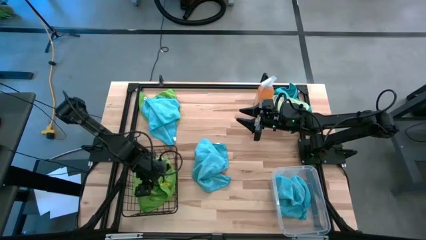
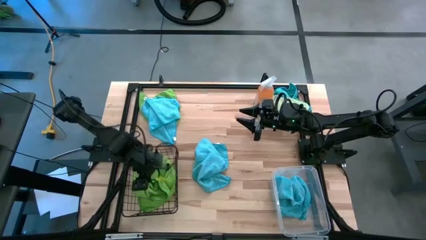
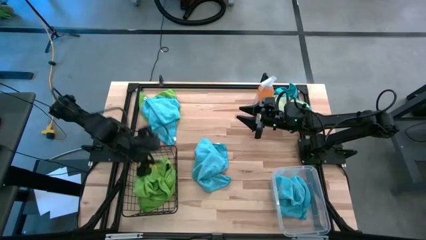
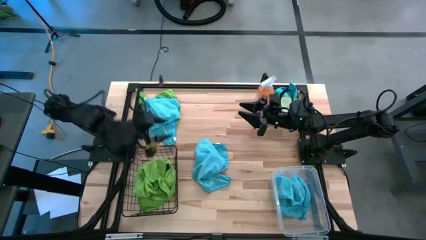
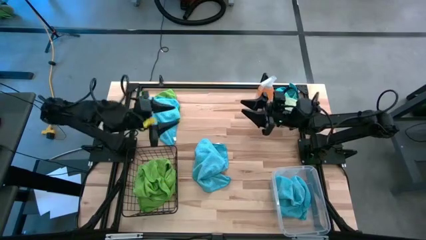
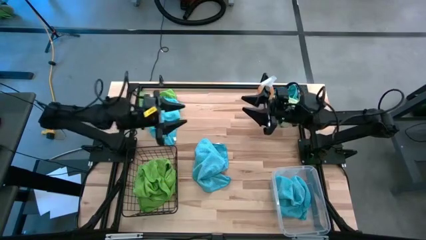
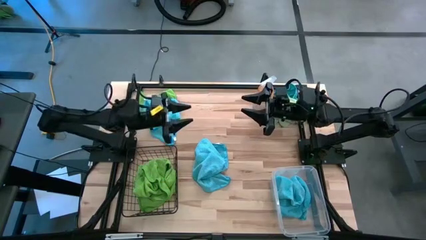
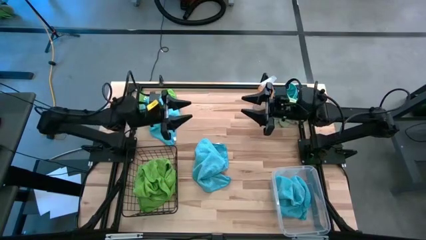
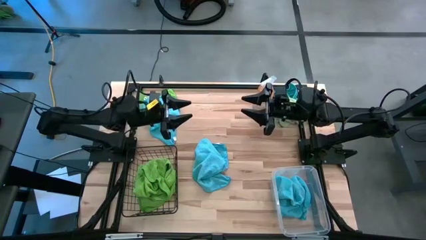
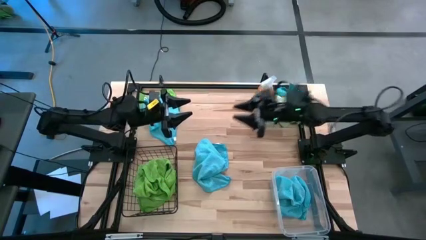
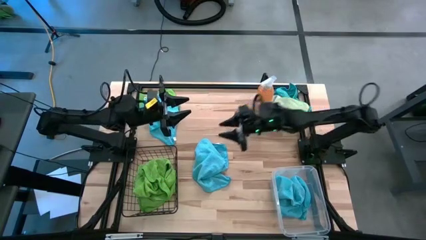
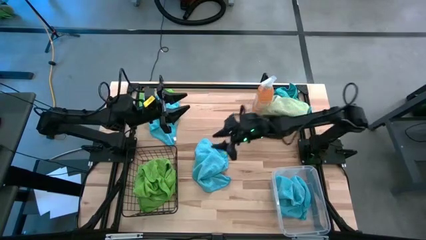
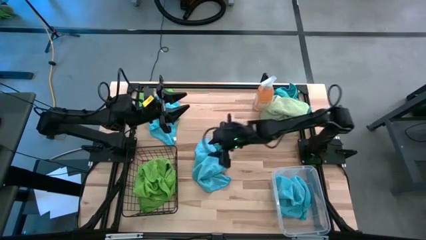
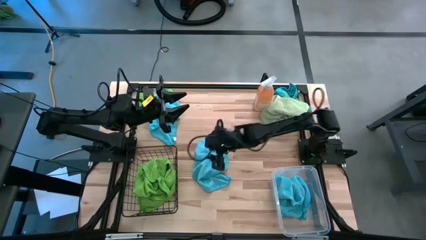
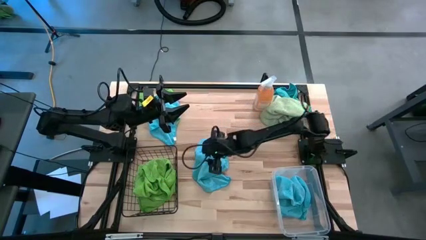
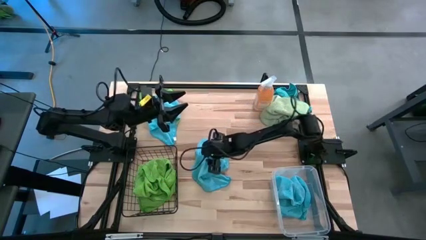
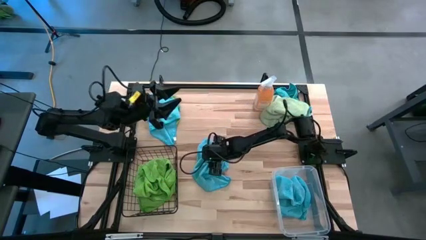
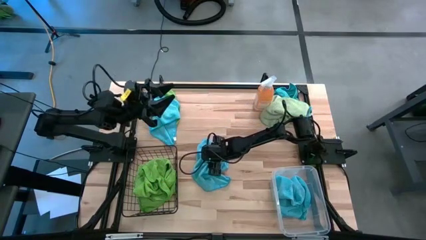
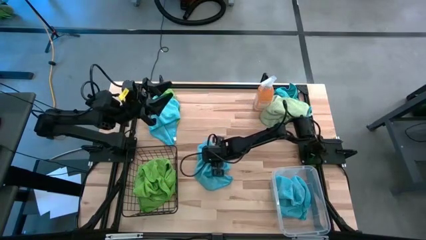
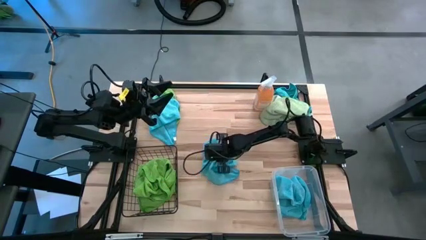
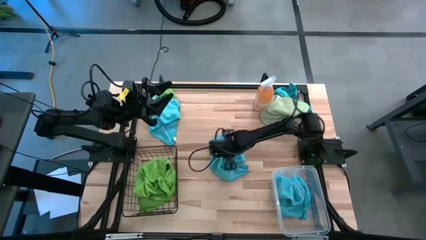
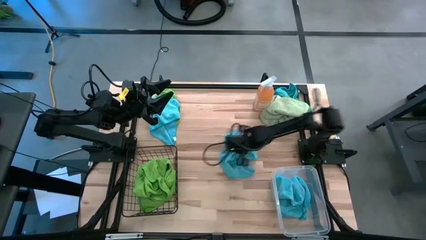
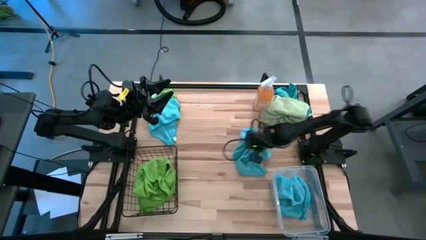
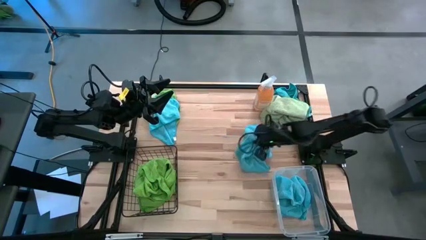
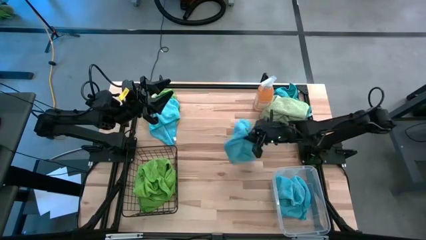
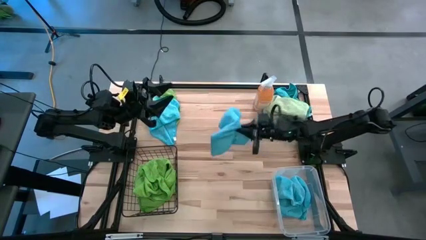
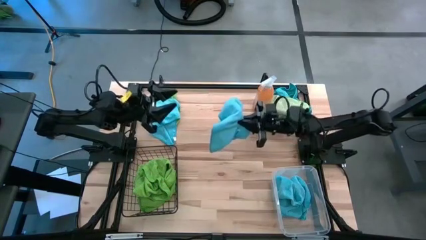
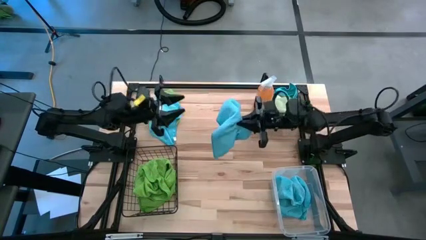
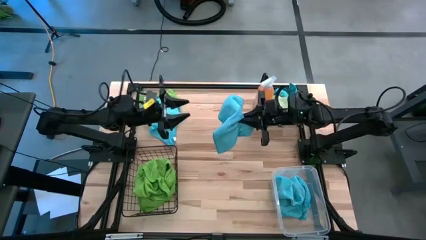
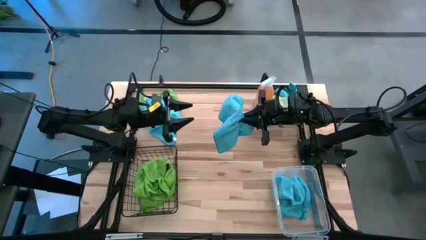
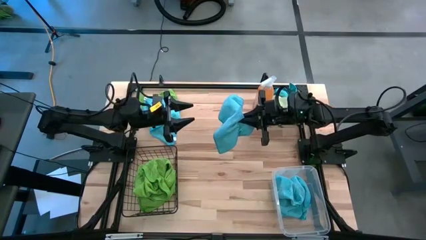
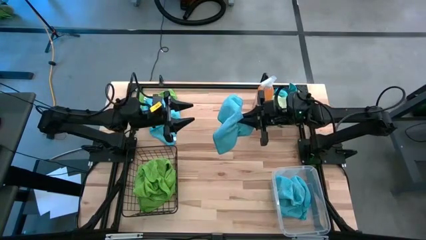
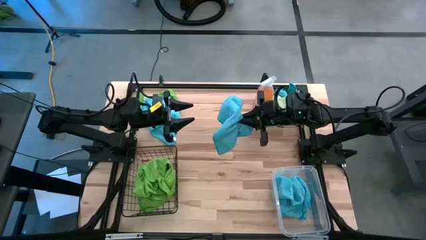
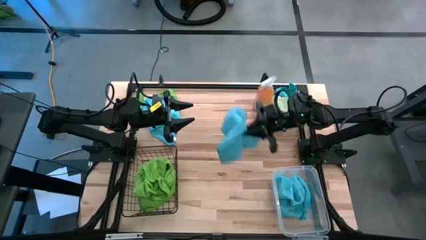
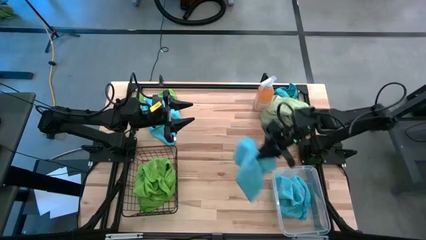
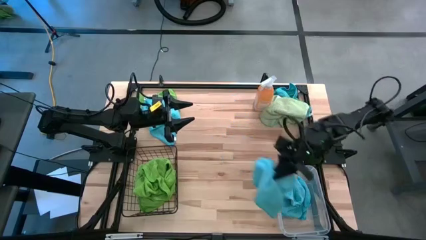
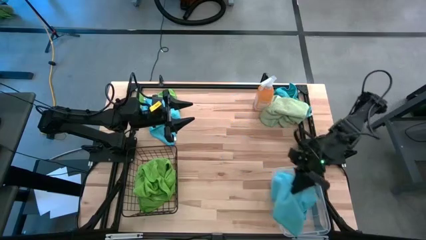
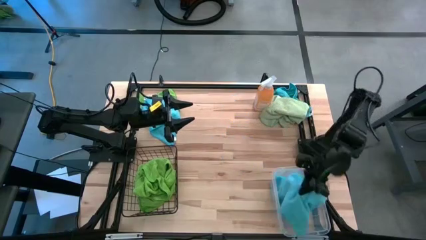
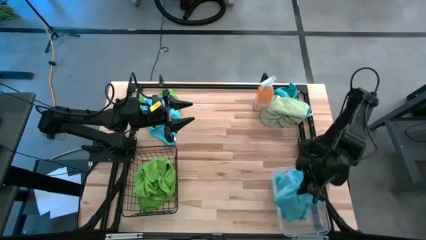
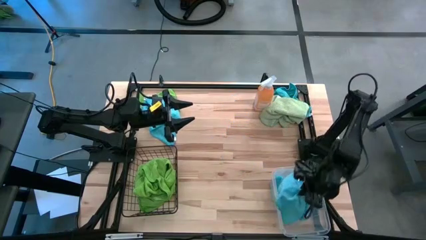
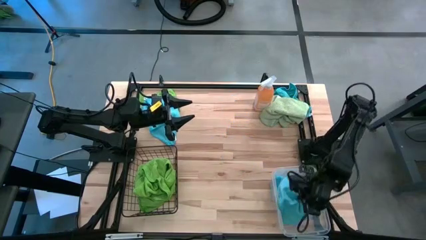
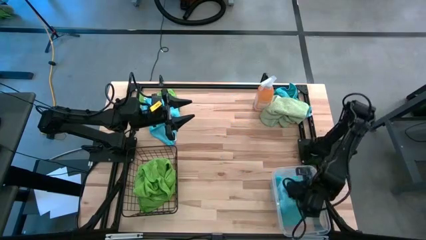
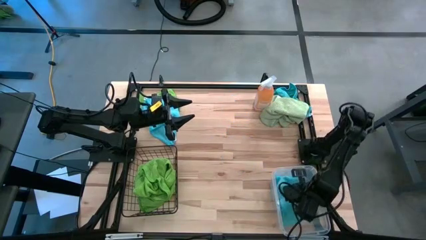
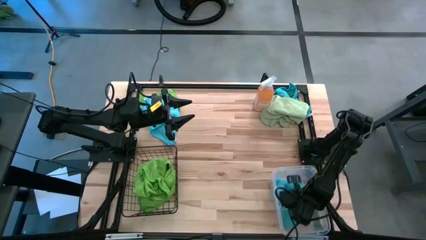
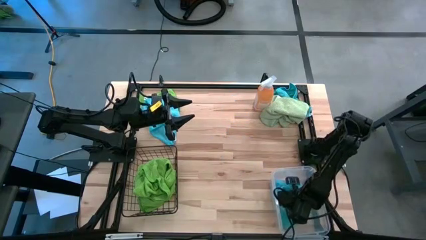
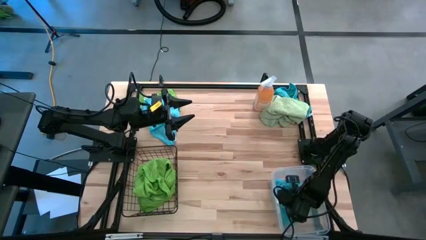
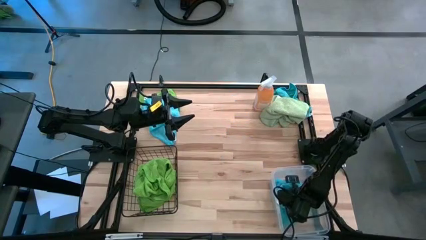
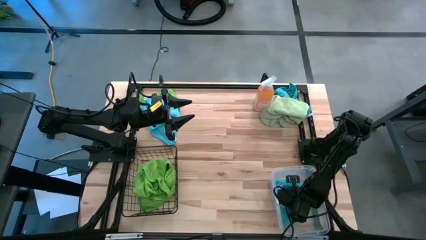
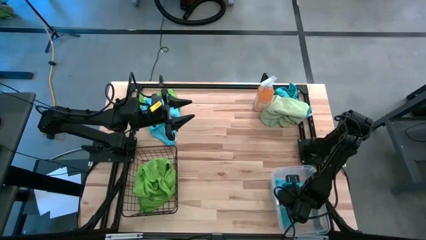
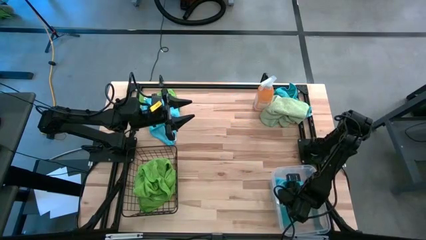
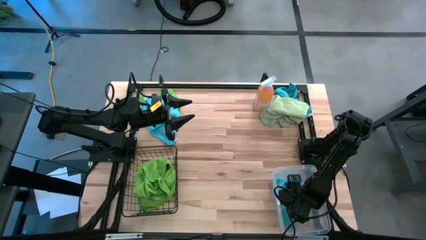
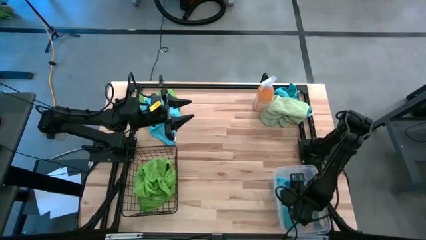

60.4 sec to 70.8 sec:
Task: Sort microfiber towel by color & place in baskets
Put the blue microfiber cloth into the transparent bin
